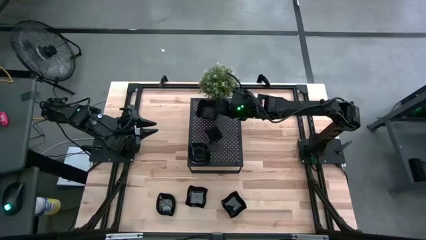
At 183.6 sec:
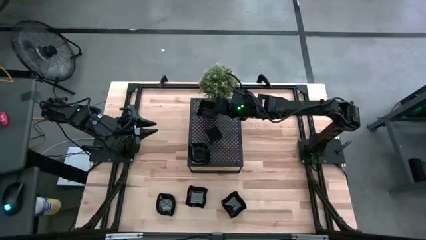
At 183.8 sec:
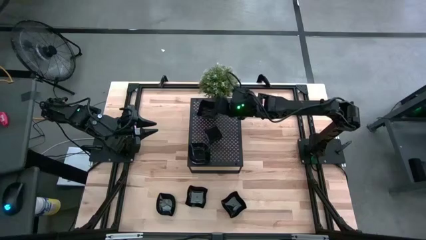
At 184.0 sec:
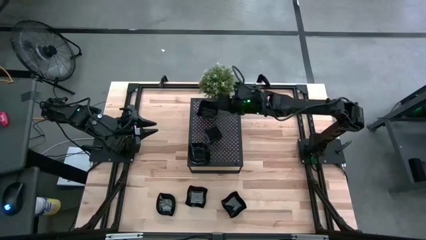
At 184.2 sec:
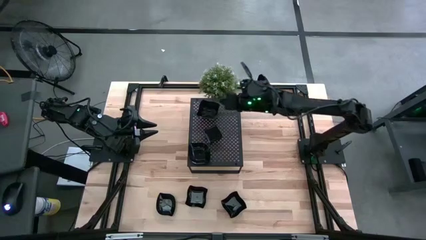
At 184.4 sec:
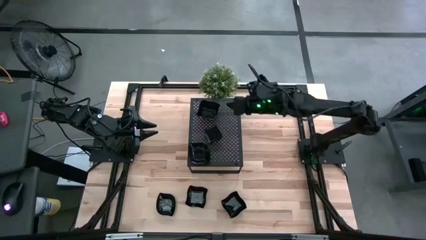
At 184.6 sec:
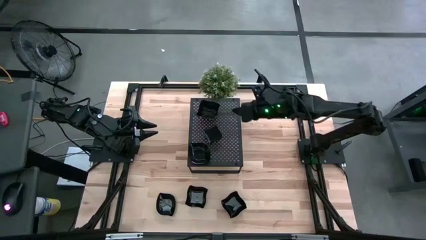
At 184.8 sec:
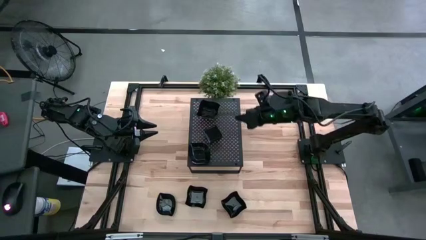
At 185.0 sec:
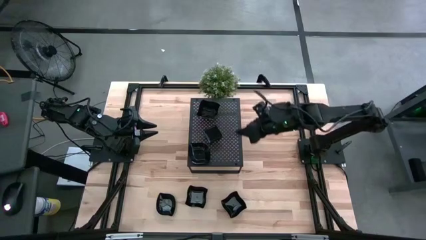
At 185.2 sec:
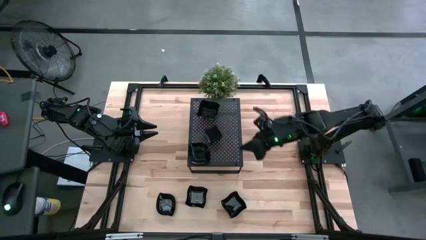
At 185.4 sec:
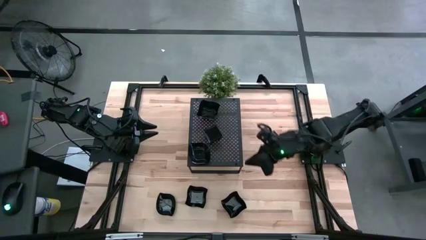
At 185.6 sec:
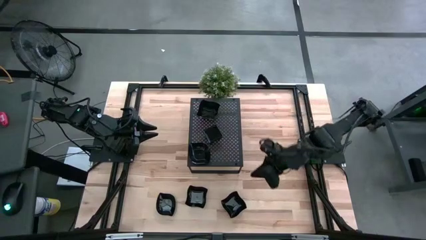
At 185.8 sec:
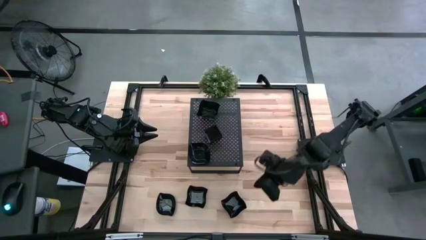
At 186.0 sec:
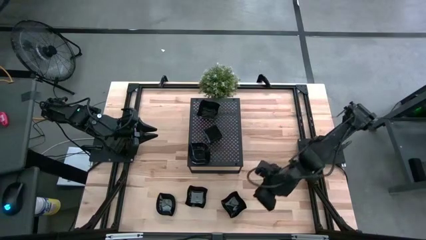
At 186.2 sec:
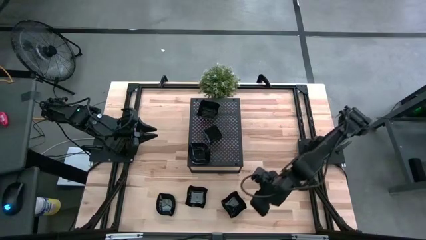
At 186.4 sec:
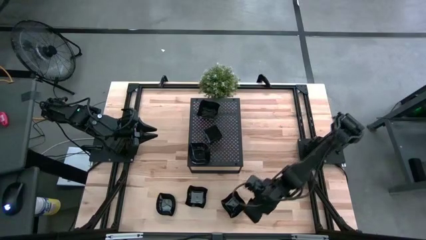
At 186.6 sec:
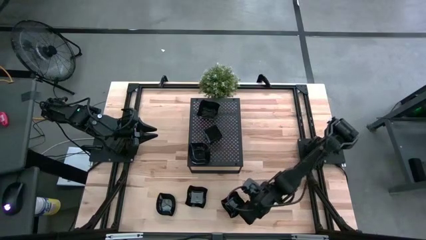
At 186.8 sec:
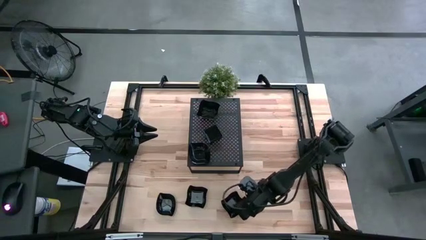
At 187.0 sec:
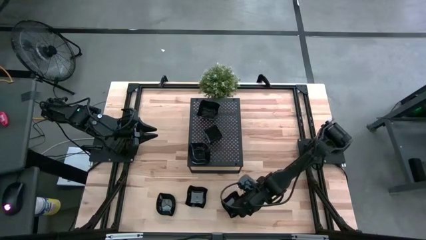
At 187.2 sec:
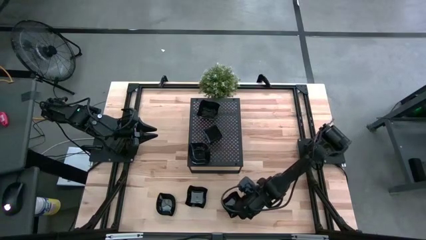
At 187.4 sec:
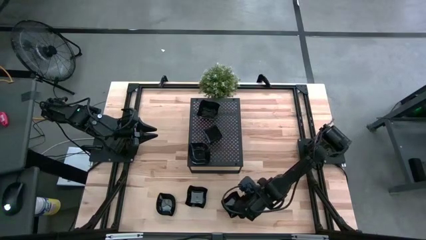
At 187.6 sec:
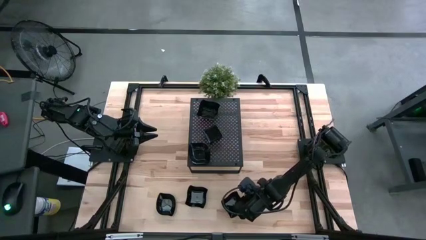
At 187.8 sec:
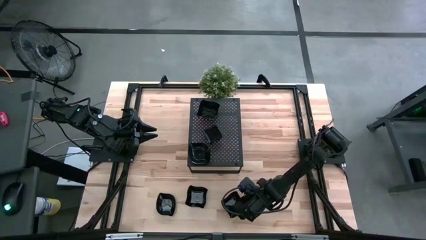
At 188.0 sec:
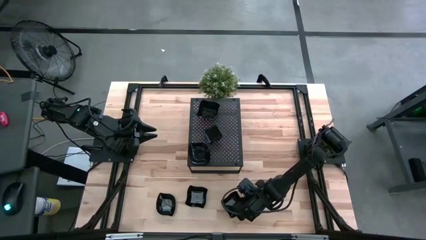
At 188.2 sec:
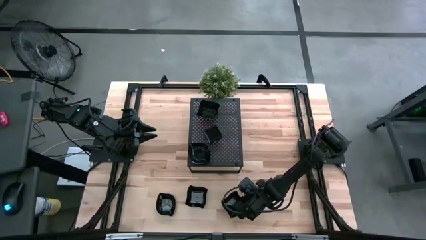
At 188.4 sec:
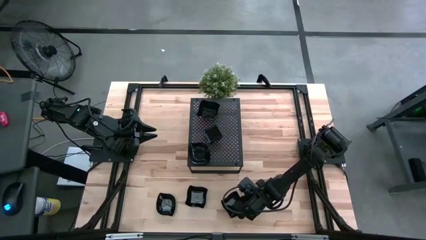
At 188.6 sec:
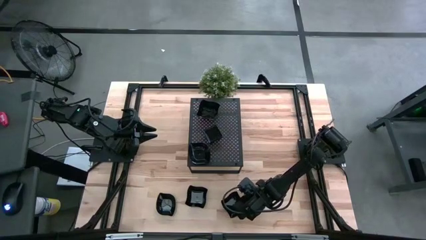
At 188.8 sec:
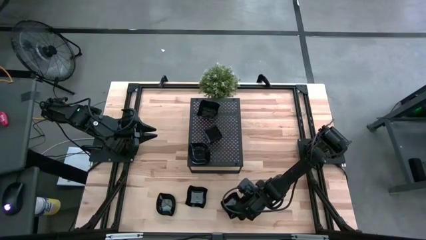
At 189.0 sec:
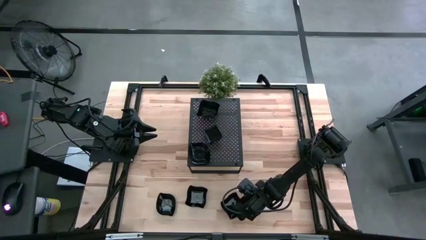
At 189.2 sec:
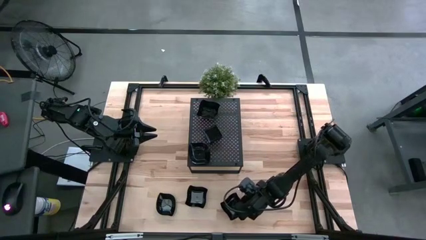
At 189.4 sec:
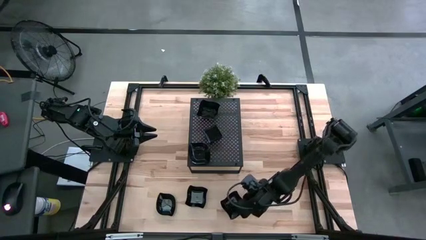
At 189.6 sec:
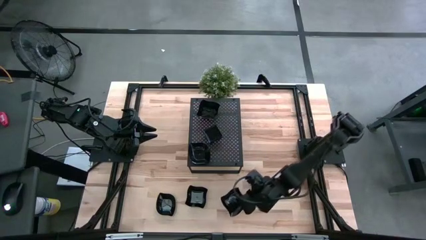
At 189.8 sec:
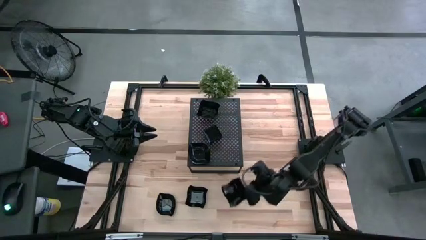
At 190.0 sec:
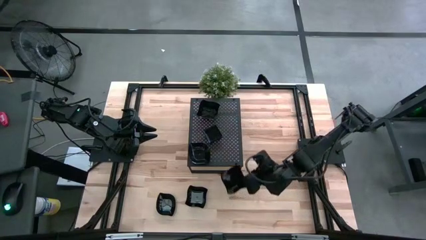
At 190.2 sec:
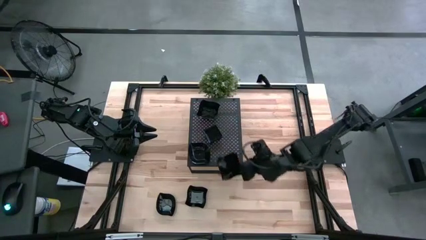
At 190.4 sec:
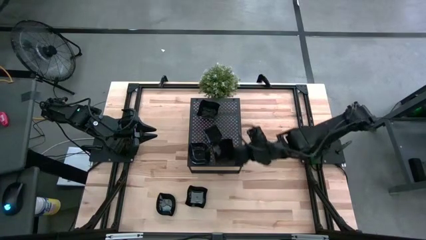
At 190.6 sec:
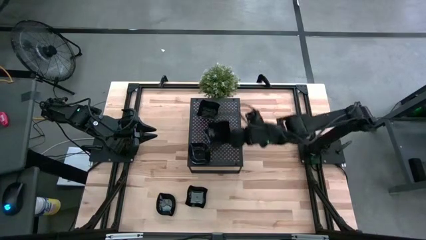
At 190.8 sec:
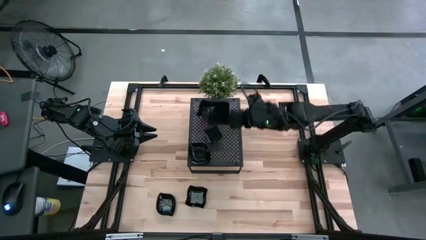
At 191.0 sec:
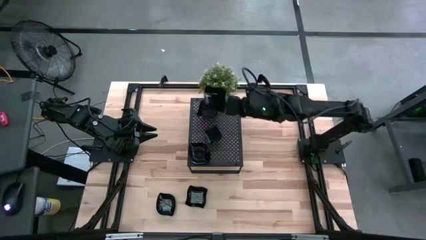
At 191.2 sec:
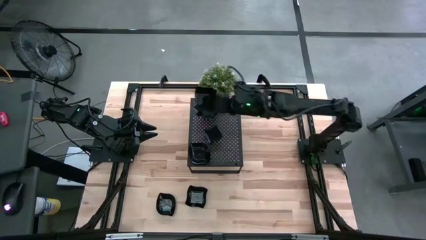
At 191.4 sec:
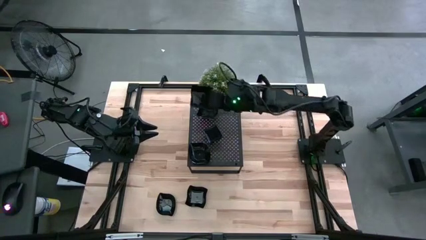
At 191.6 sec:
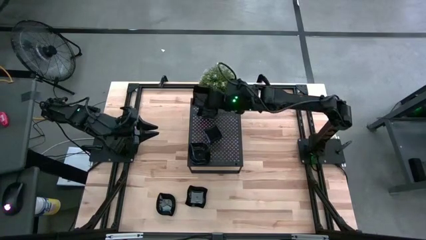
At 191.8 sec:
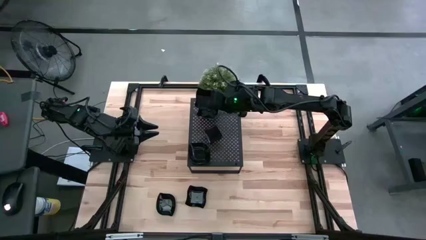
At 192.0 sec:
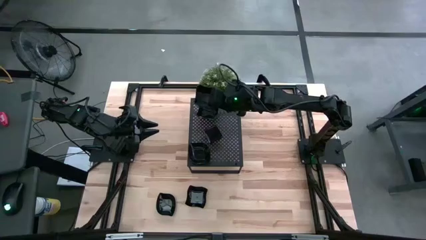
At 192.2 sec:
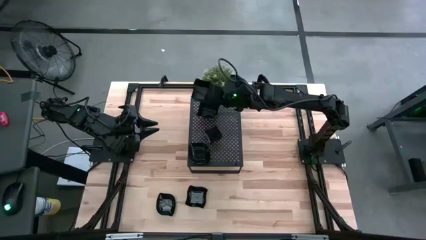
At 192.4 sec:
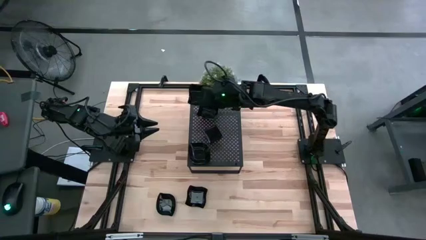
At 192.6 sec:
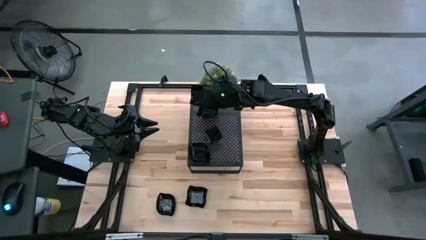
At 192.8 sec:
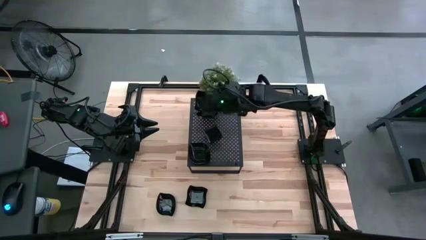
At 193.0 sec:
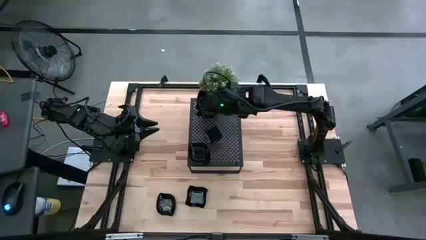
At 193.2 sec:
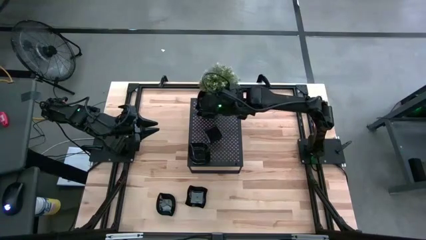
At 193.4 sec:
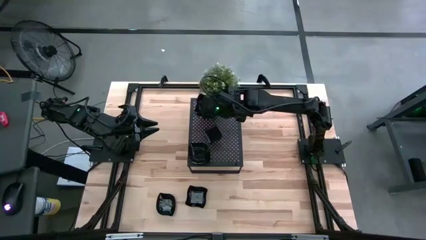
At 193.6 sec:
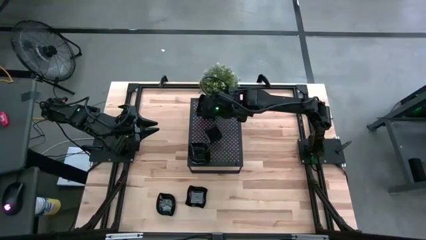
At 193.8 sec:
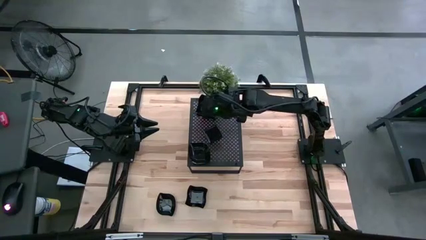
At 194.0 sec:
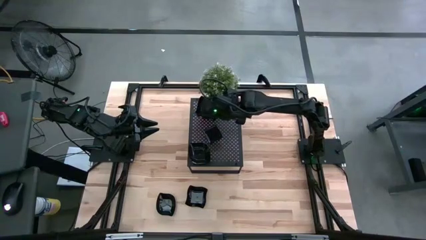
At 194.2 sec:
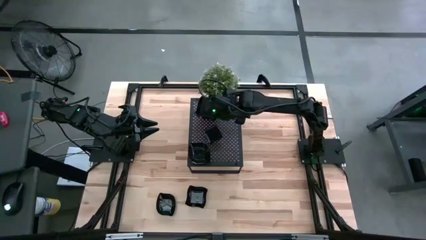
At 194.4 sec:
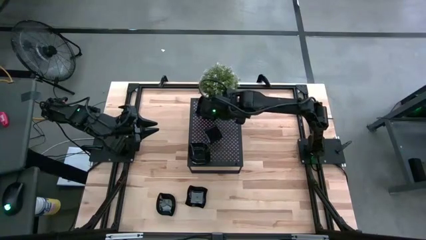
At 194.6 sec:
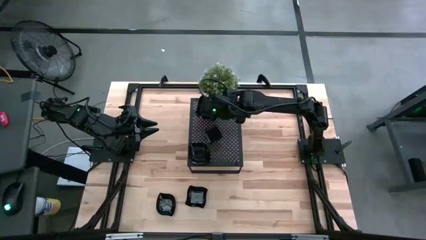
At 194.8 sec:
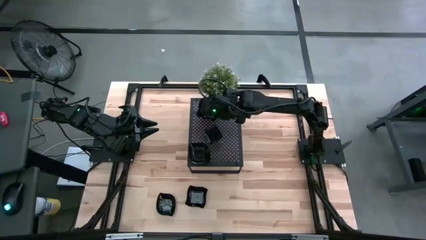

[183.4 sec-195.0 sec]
Task: Pick & Place Mini shaped plates
Stack the distorted square plate on top of the distorted square plates on the shelf
